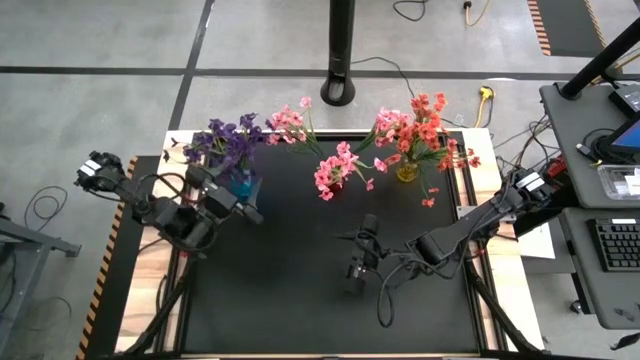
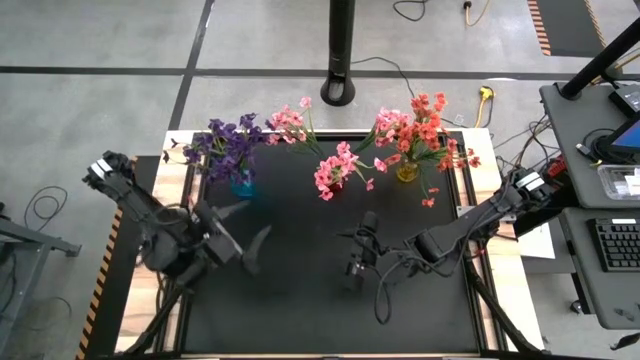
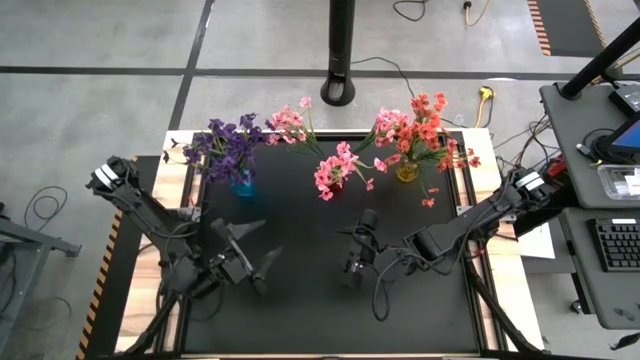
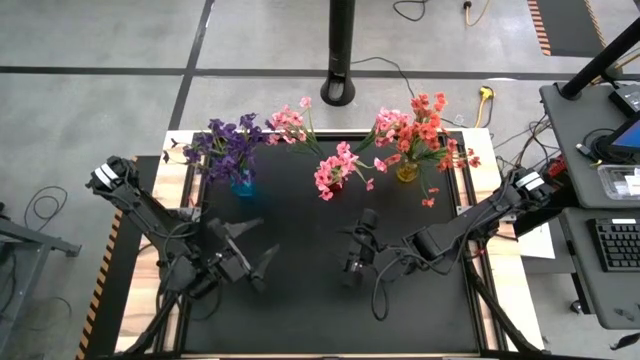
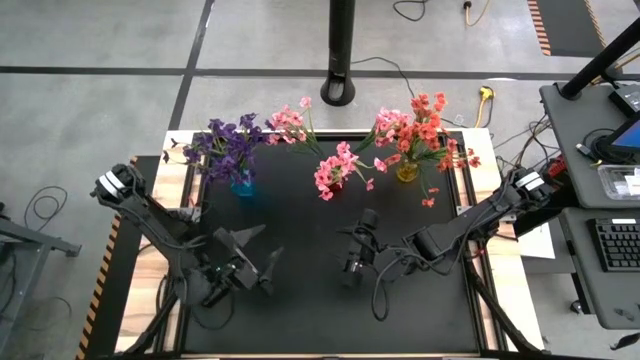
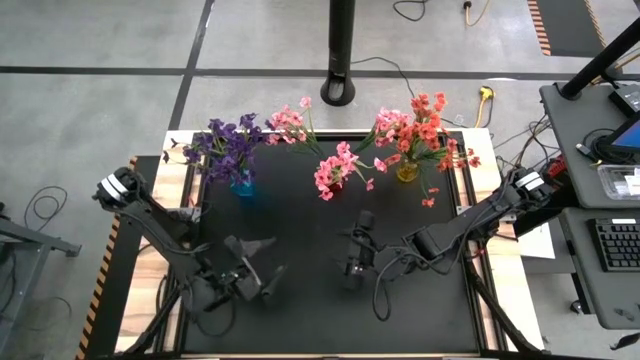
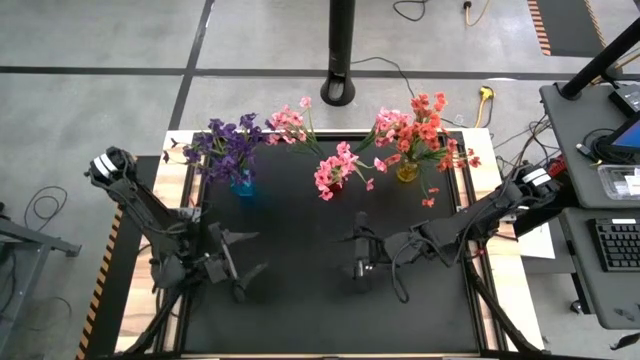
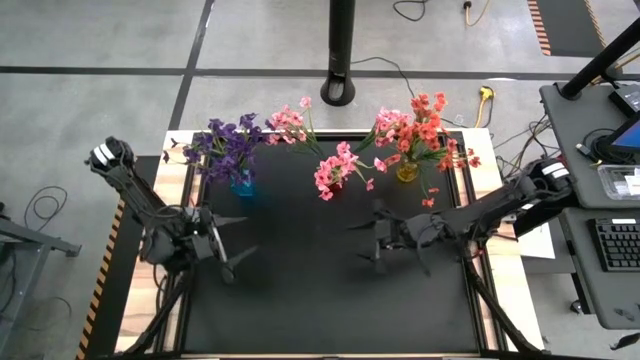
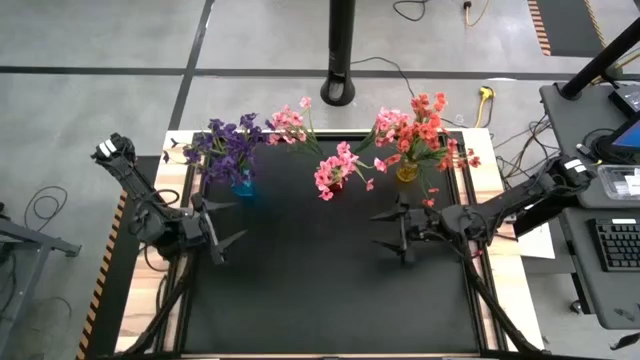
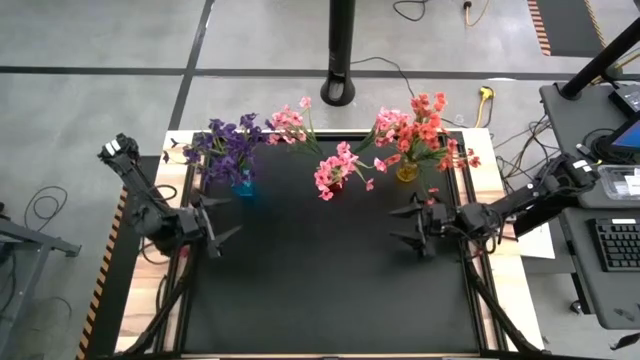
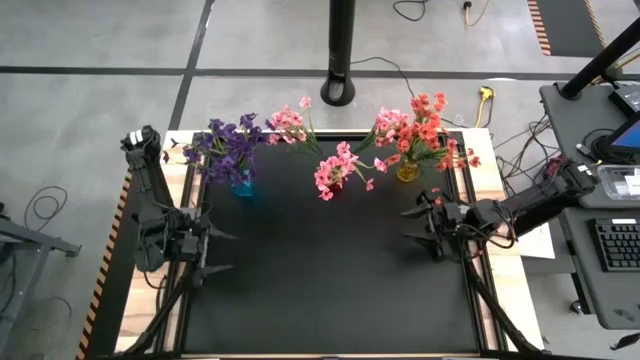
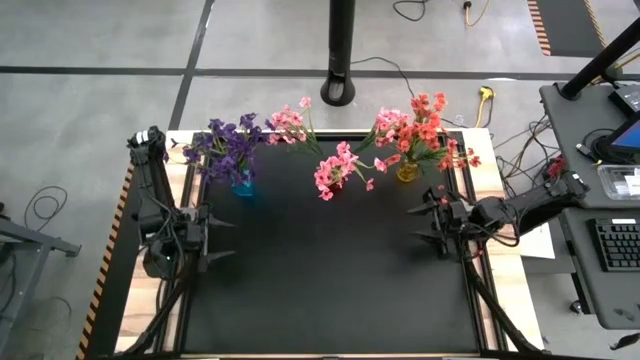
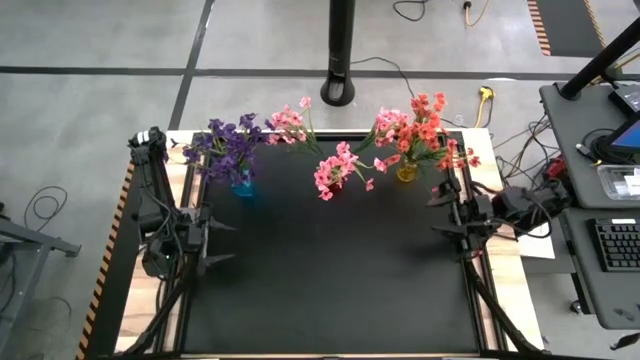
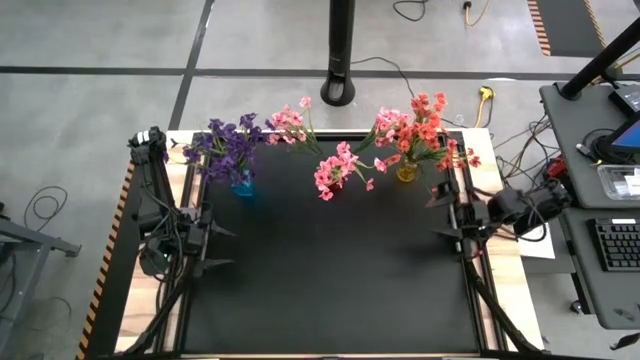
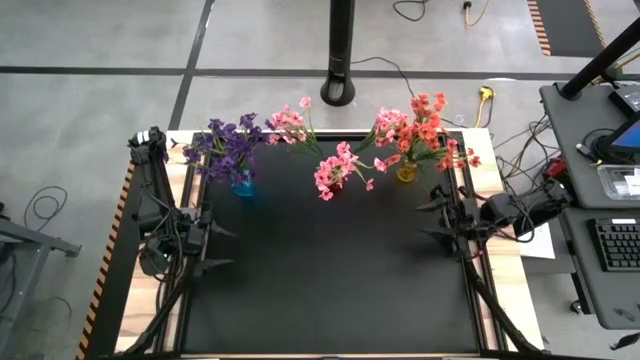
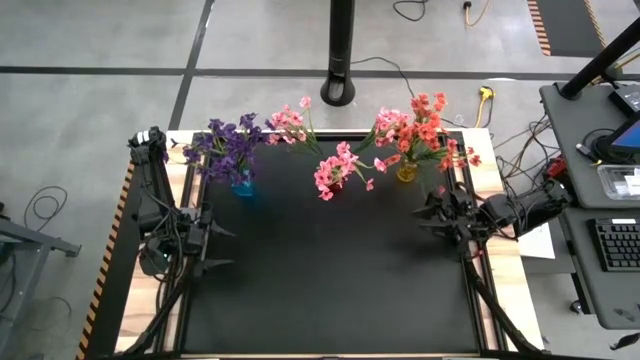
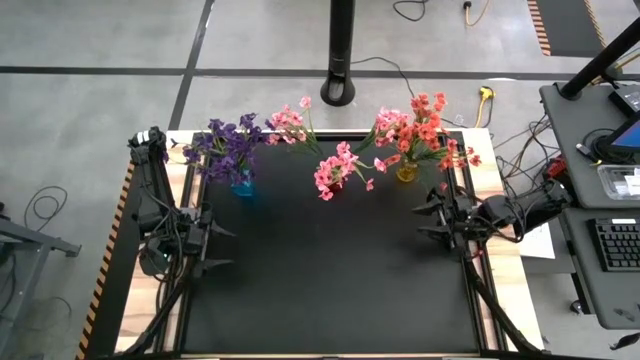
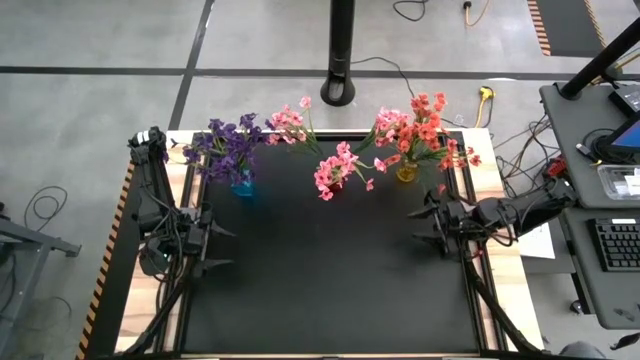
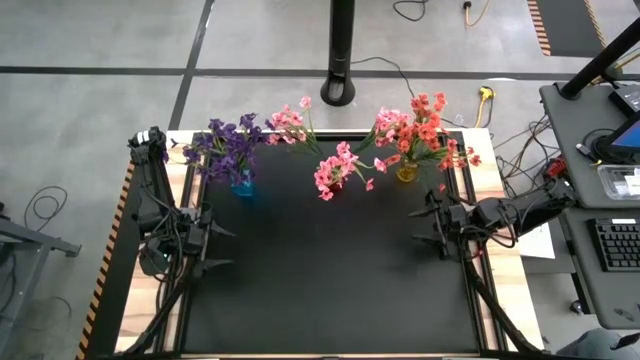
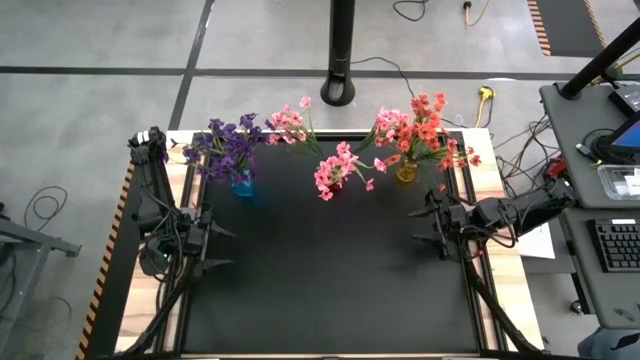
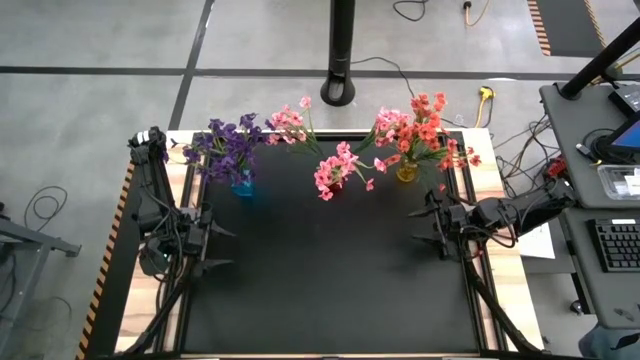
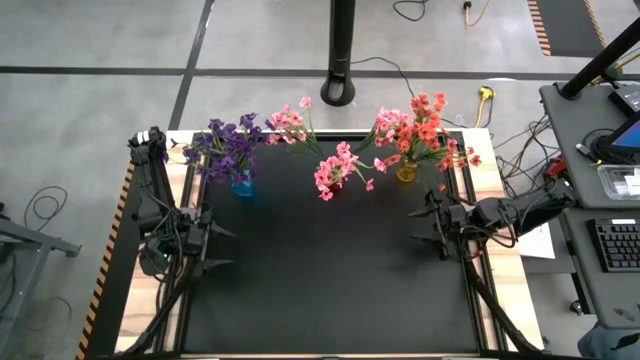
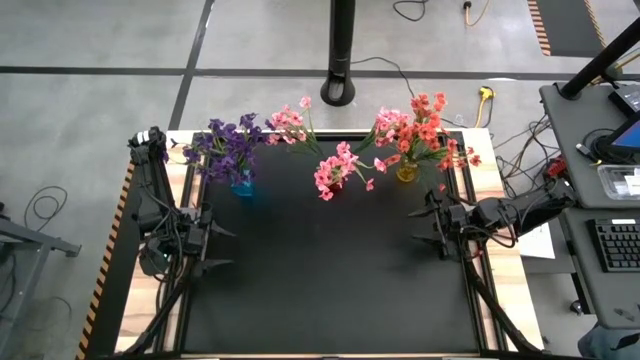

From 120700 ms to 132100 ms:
Task: Sort flowers into vase by color
Return to Home Position

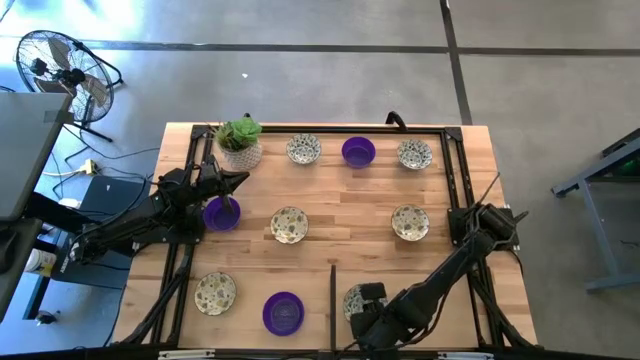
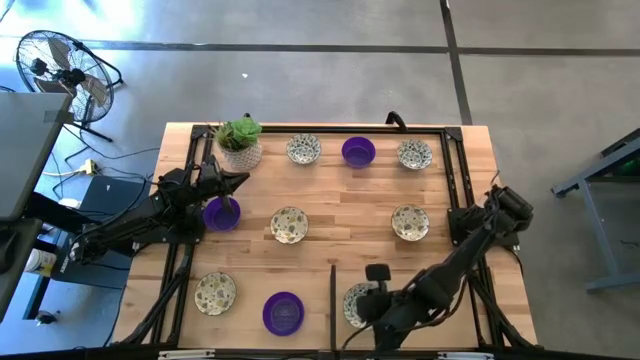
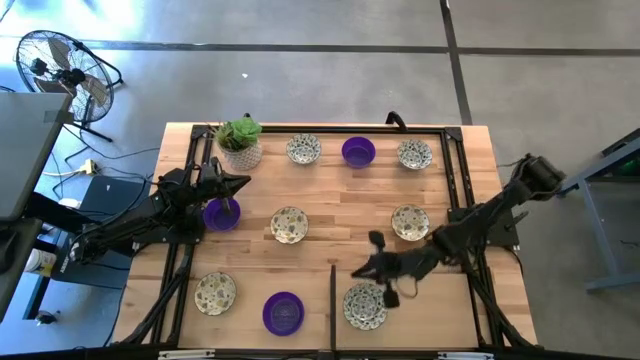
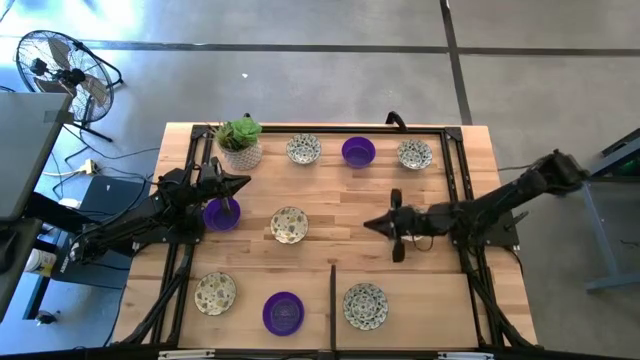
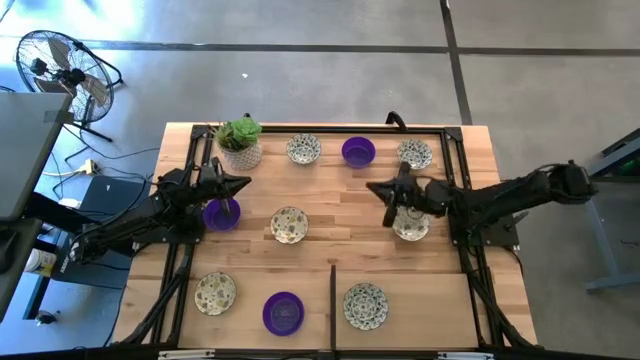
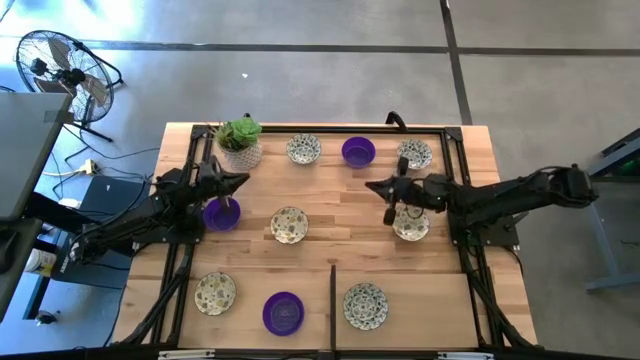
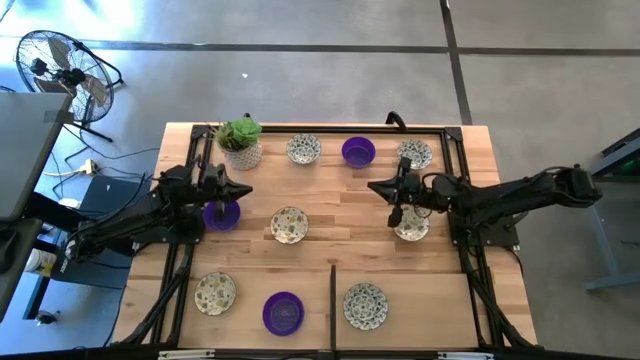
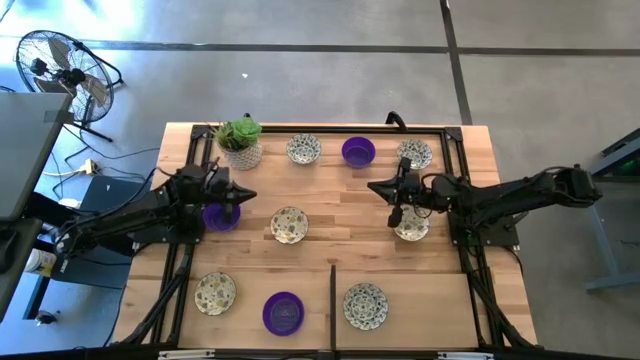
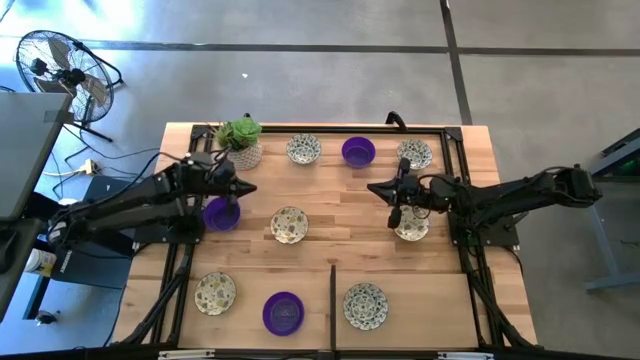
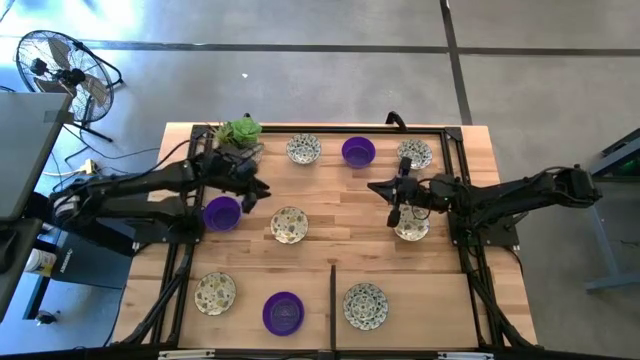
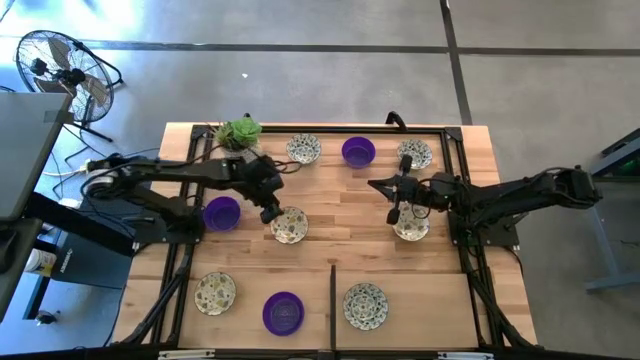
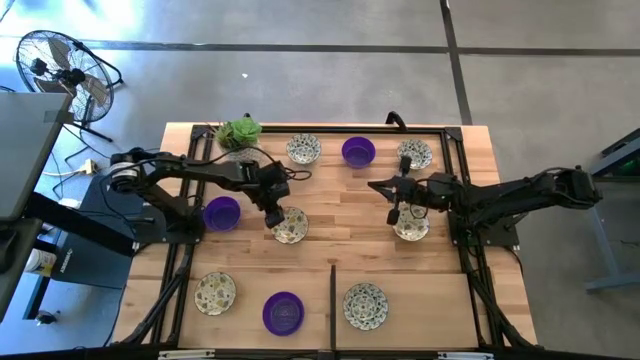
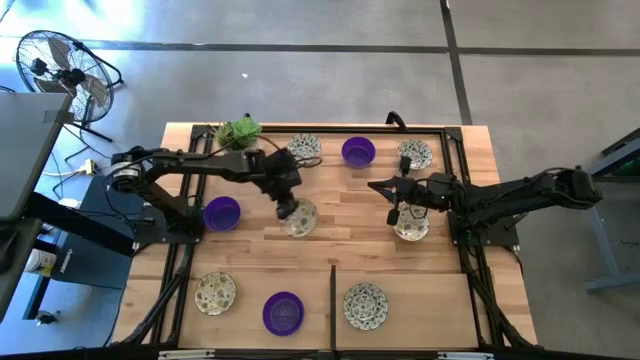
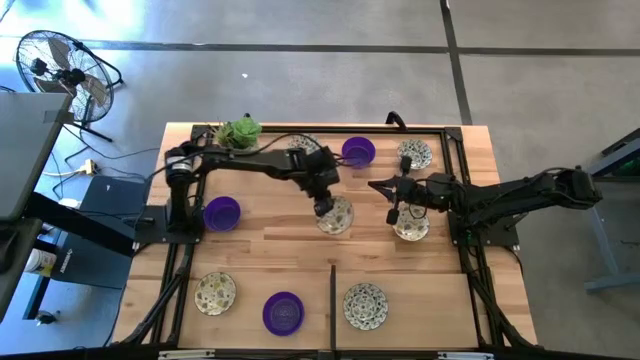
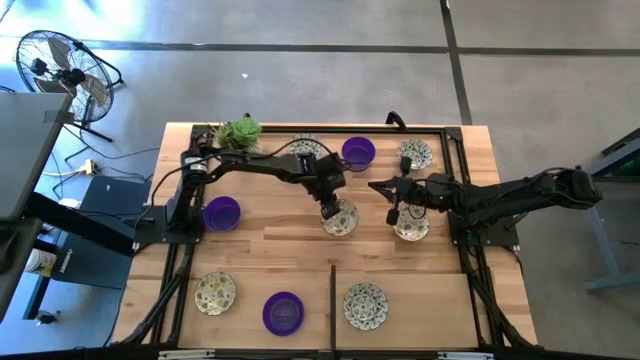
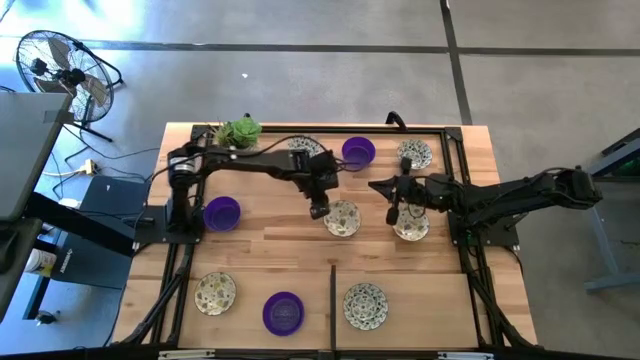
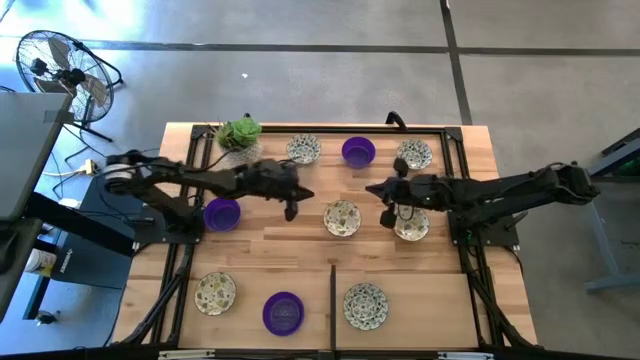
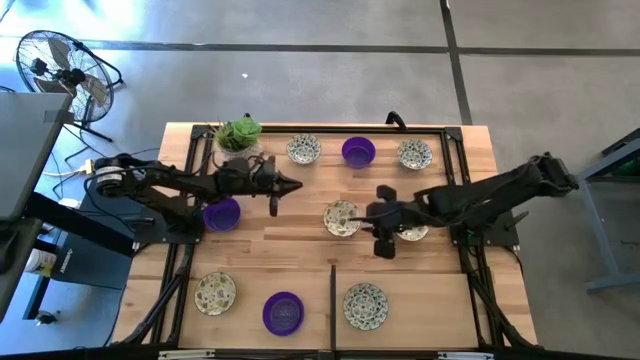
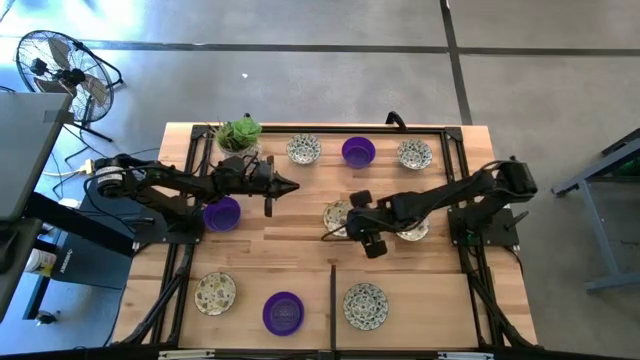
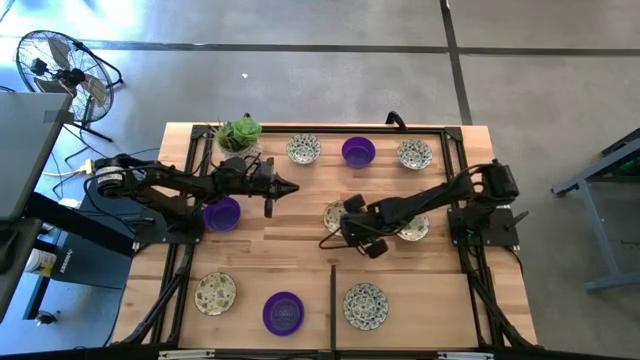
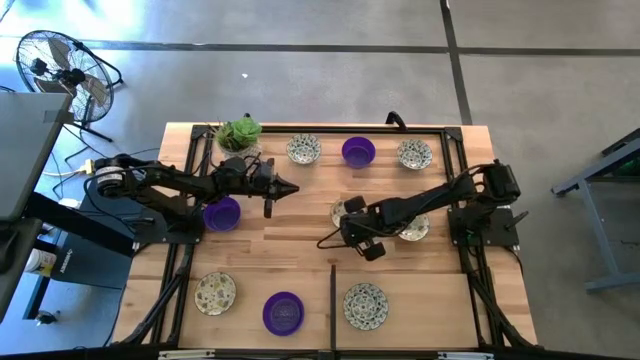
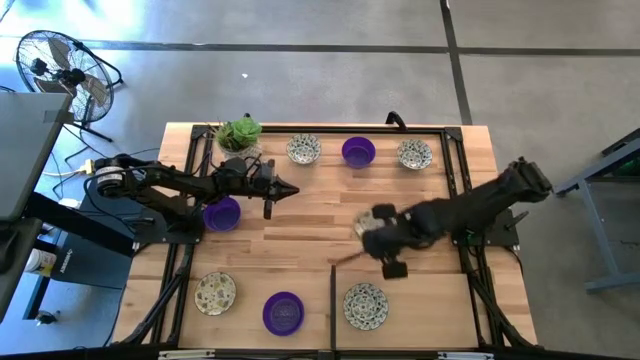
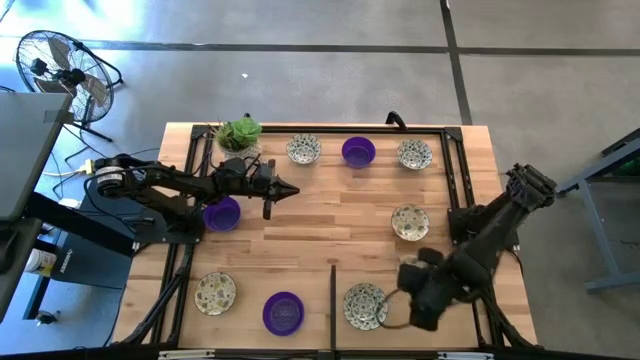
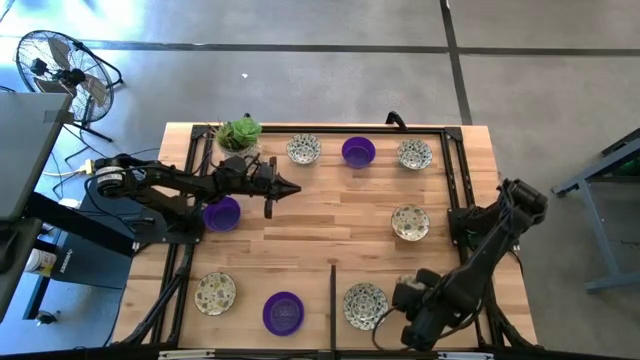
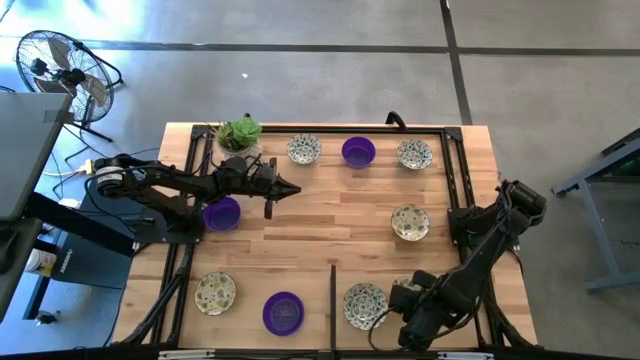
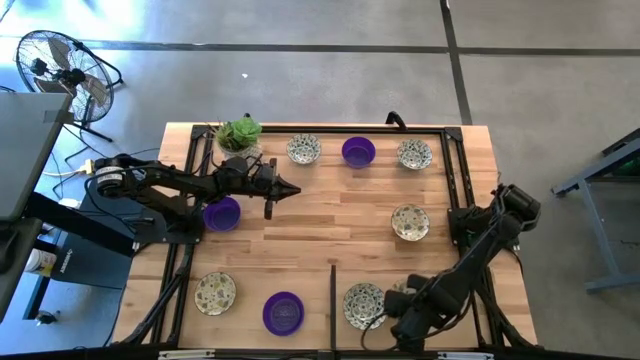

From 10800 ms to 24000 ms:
Task: Pick & Place Mini bowls
Put the top left yellow patterned bowl on the shelf
